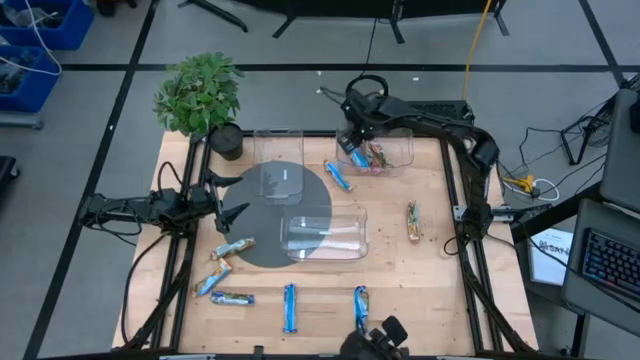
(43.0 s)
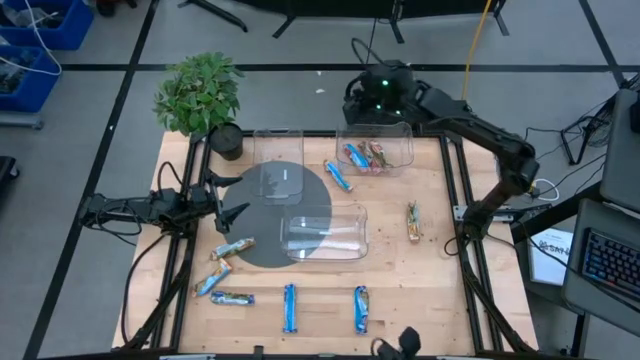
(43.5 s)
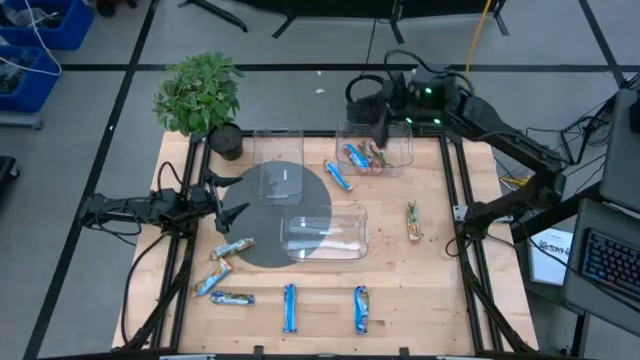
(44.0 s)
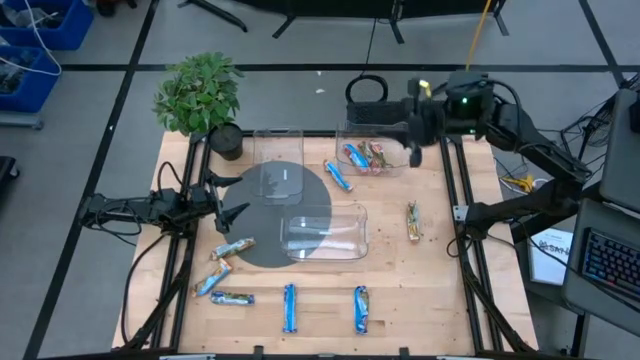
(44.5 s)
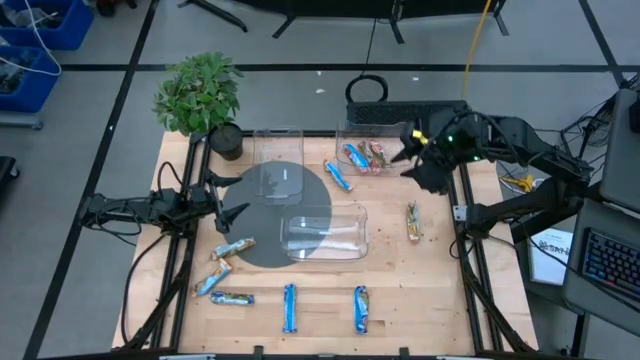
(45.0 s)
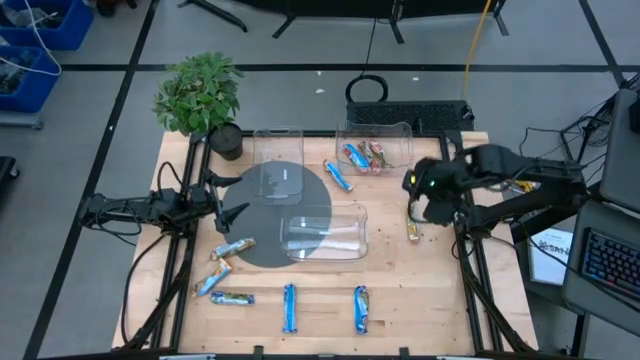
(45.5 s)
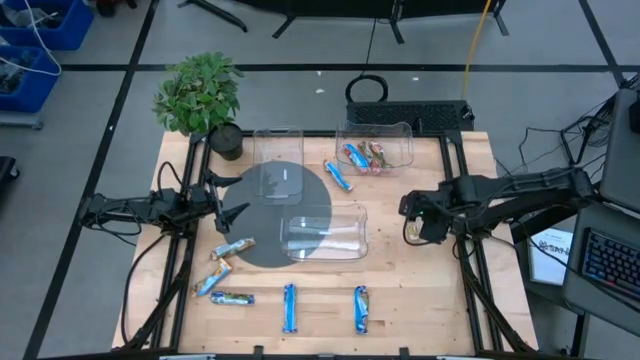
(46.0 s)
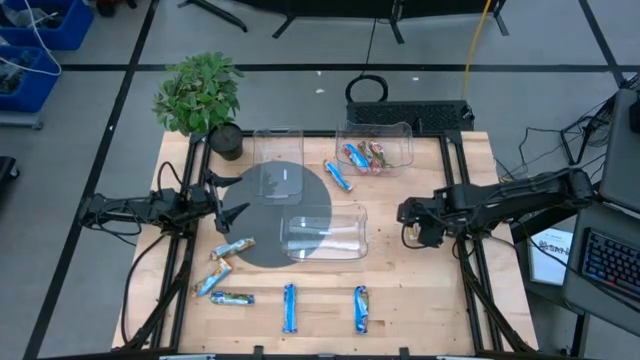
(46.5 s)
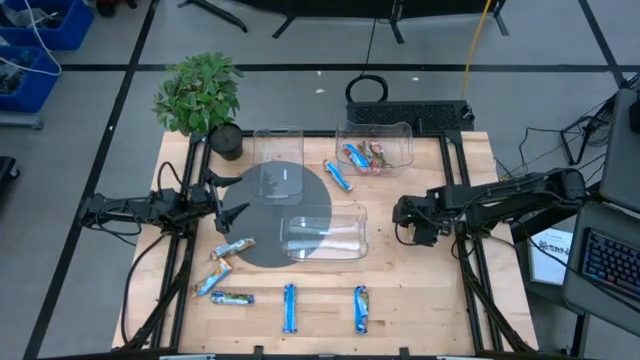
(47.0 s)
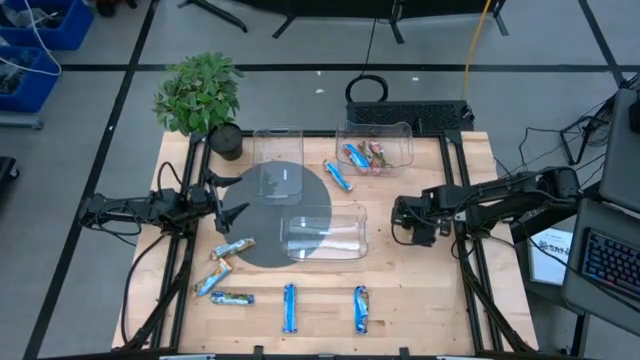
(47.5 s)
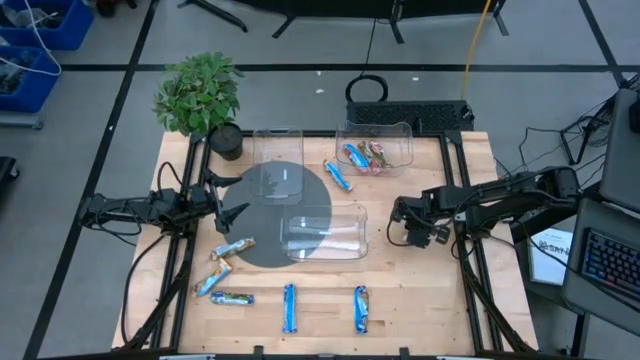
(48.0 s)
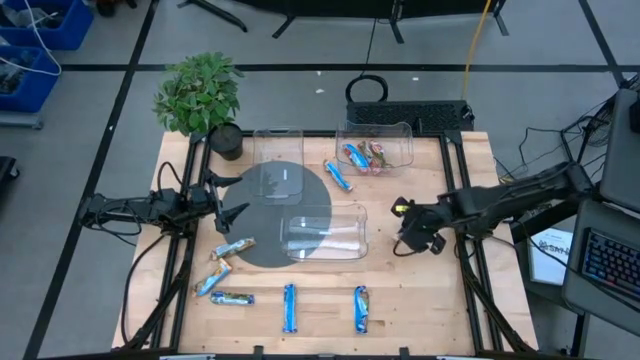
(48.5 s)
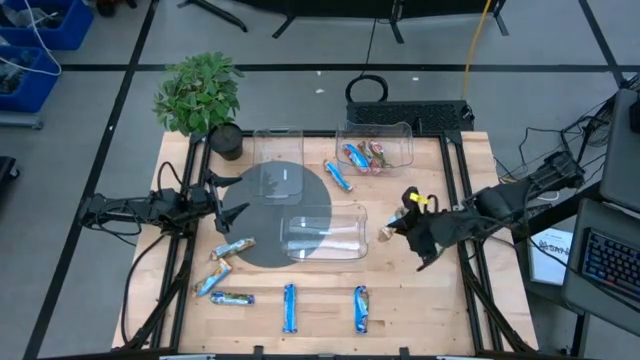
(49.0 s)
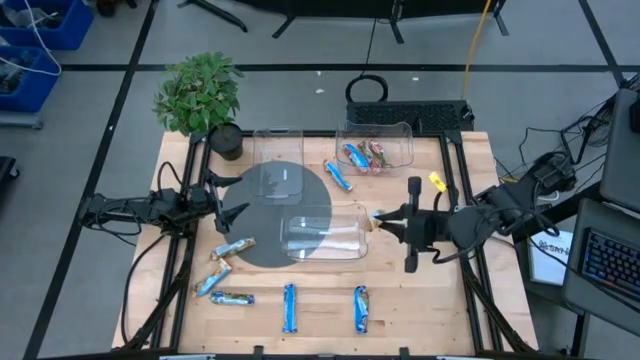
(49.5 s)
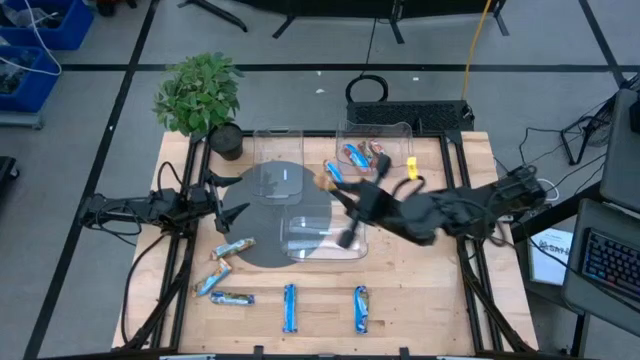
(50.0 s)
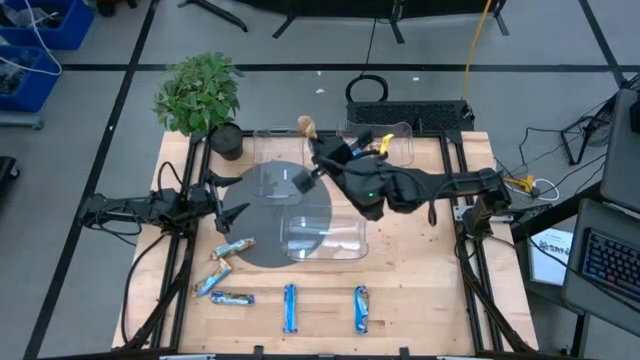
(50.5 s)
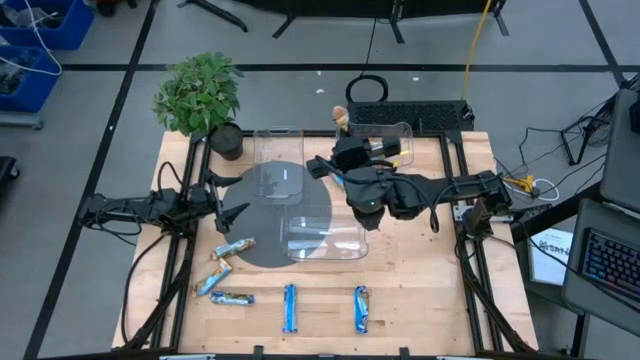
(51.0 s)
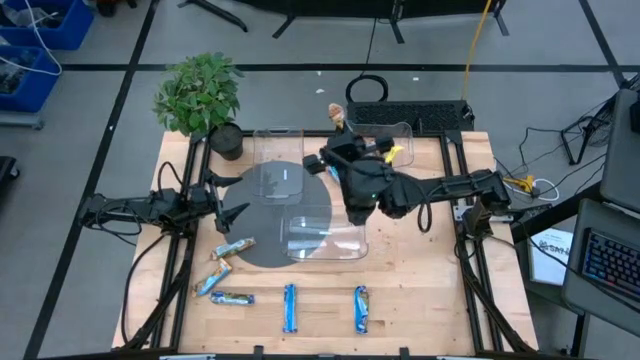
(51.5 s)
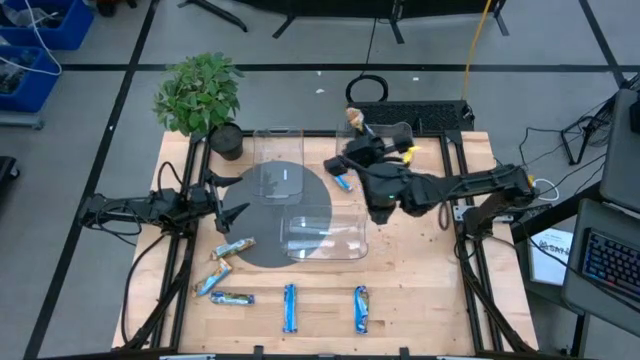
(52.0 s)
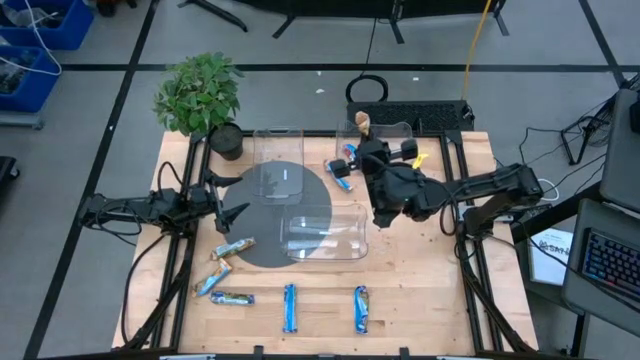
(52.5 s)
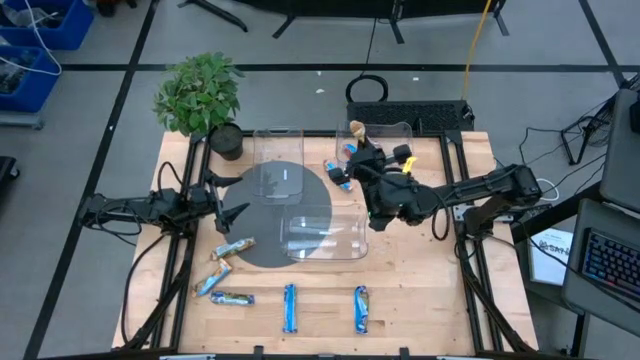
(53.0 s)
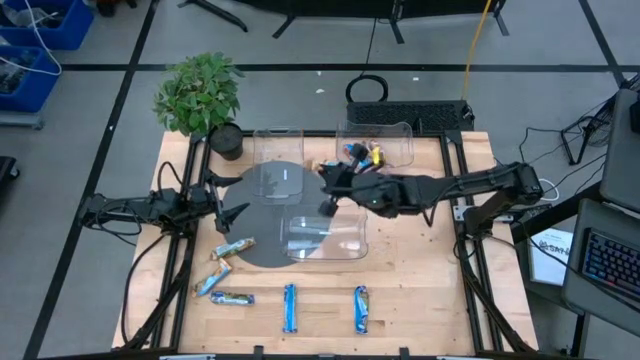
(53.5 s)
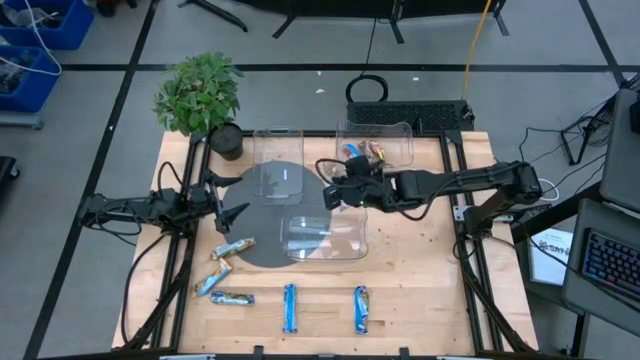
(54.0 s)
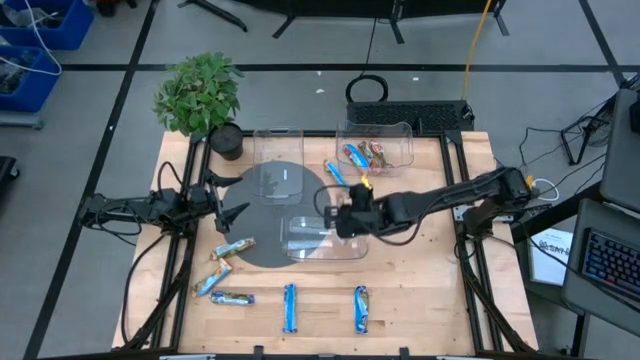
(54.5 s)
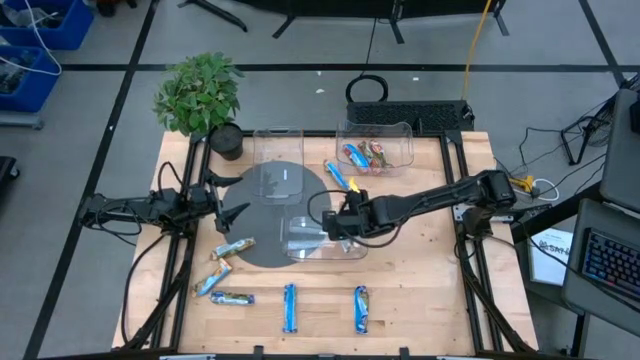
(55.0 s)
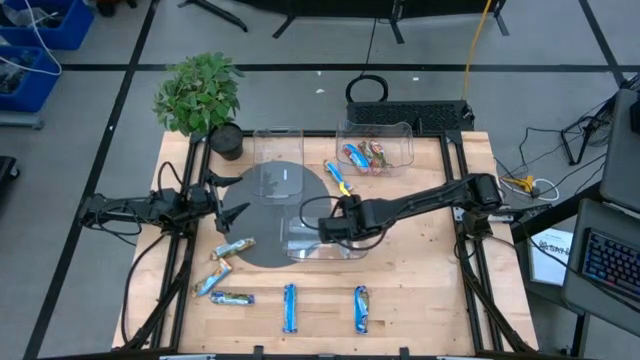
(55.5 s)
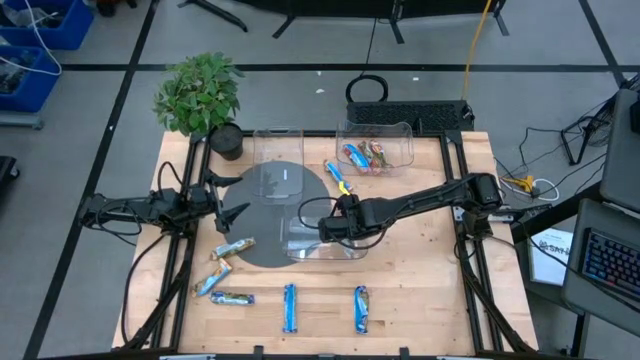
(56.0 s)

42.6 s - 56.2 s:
Task: Pick and place Granola Bars by type
Put the yellow granola bar into the bottom transparent bin

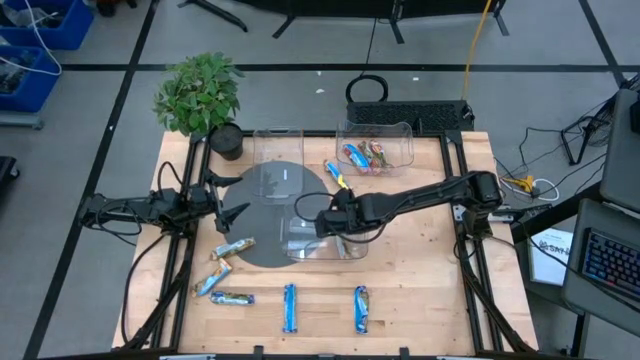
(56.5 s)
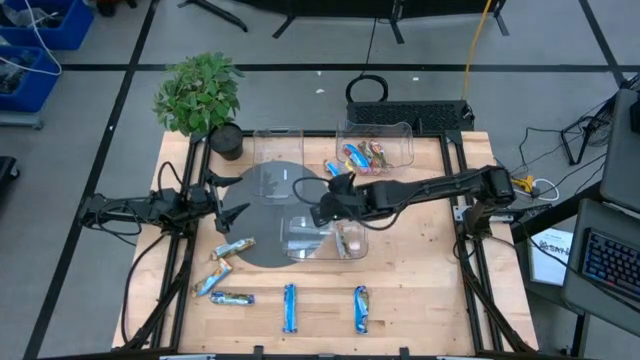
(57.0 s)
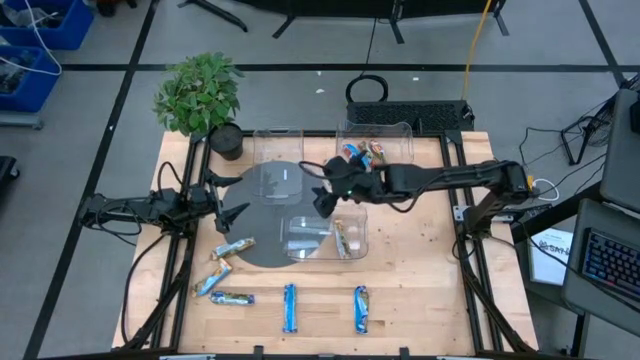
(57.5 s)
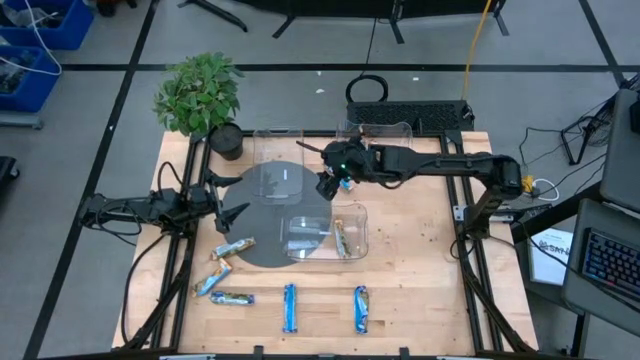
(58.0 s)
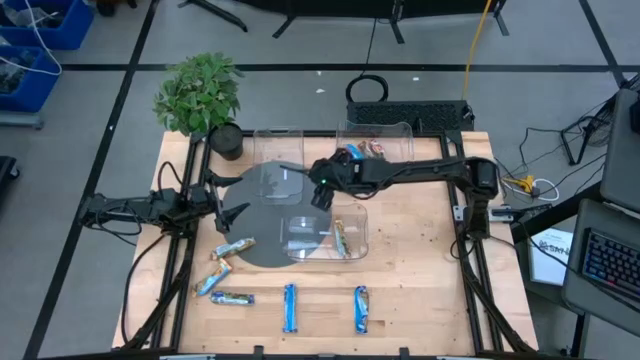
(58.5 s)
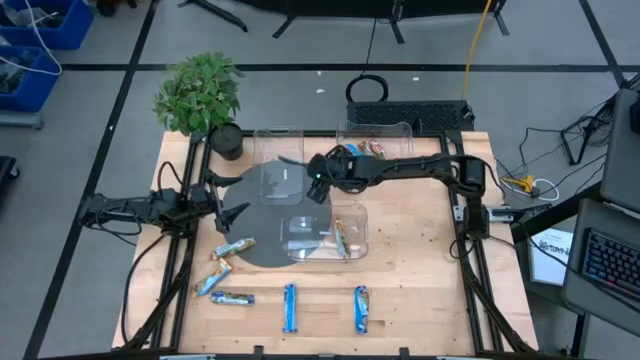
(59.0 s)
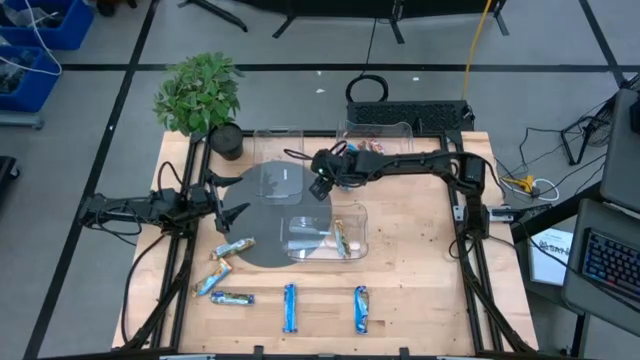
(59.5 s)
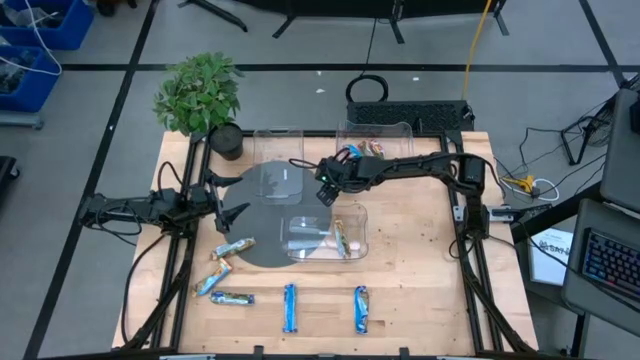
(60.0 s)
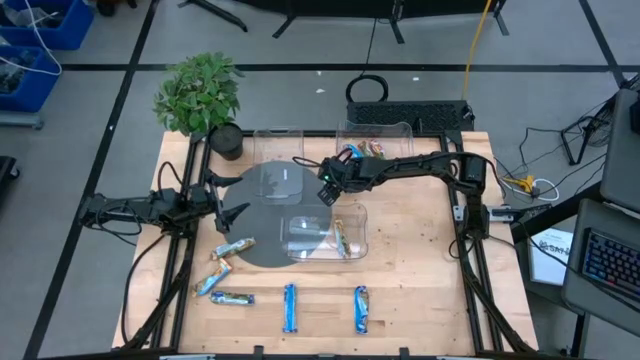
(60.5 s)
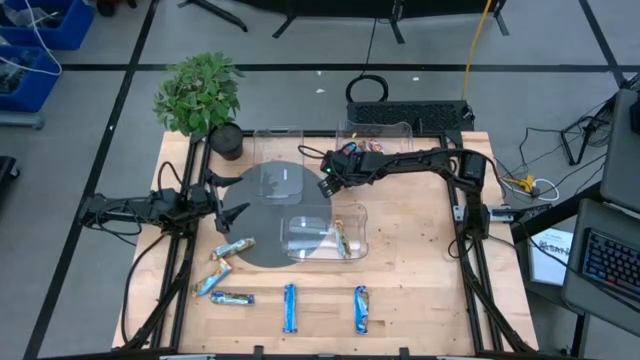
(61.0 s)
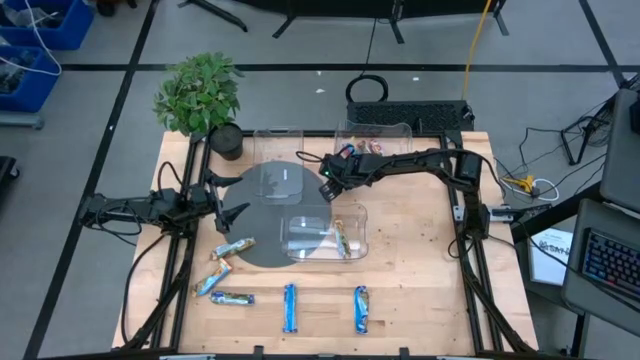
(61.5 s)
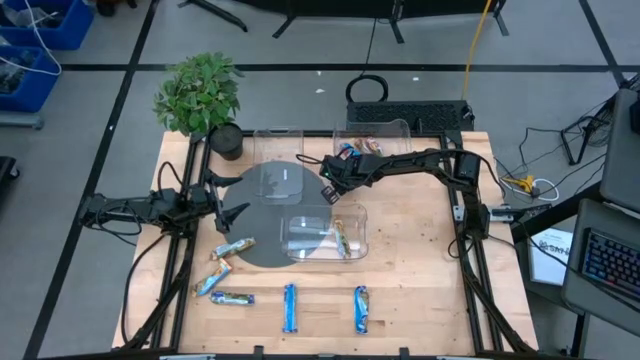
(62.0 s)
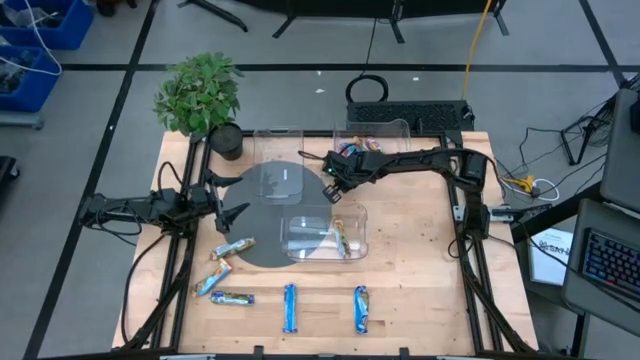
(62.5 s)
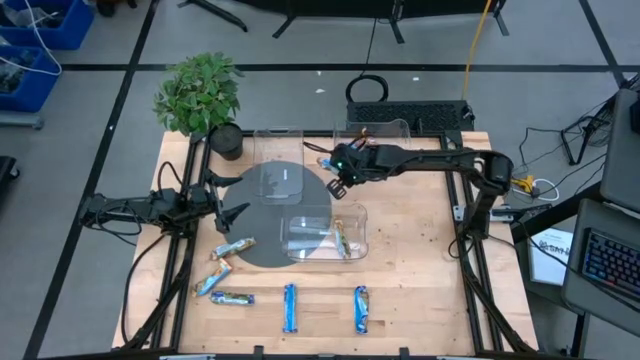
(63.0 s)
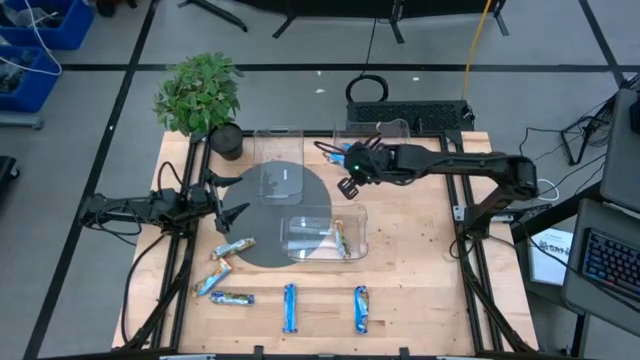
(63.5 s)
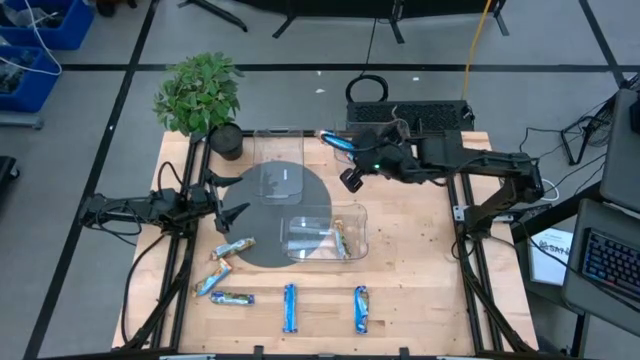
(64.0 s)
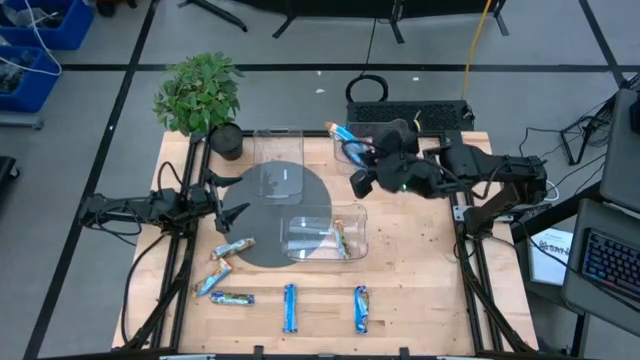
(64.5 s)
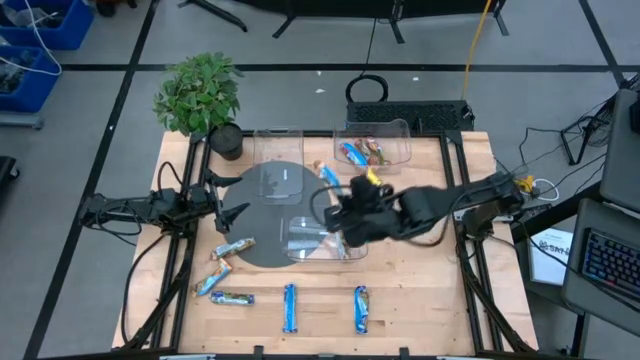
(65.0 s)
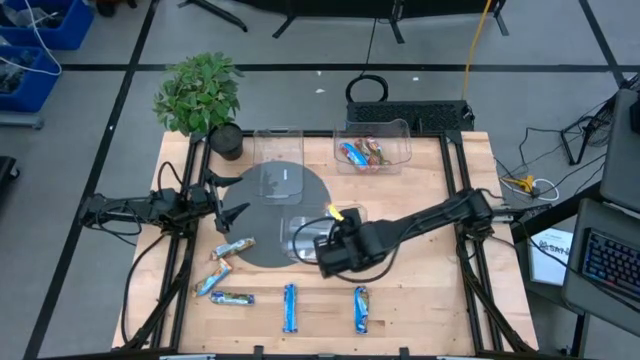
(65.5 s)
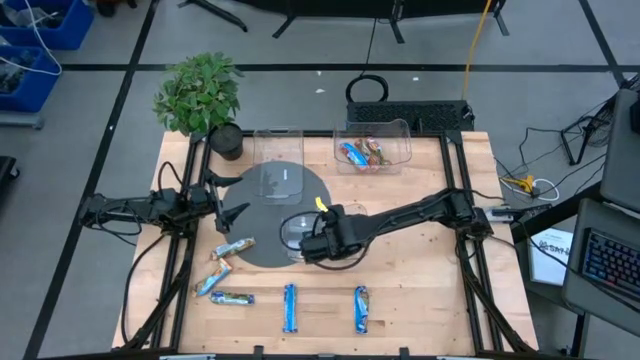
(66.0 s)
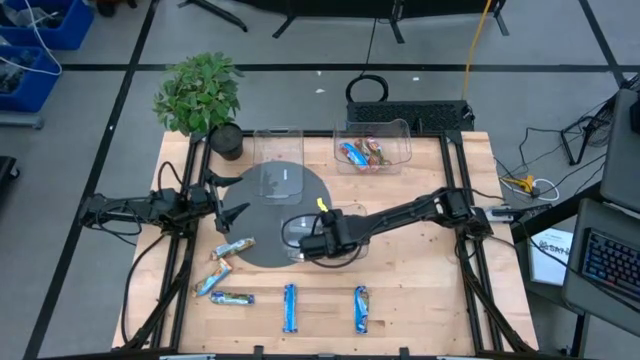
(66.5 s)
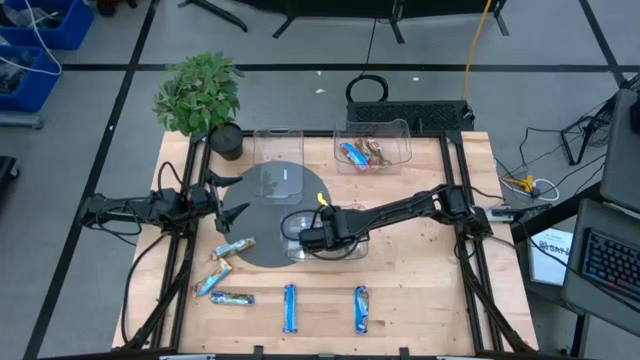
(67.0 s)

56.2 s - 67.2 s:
Put the yellow granola bar into the bottom transparent bin
